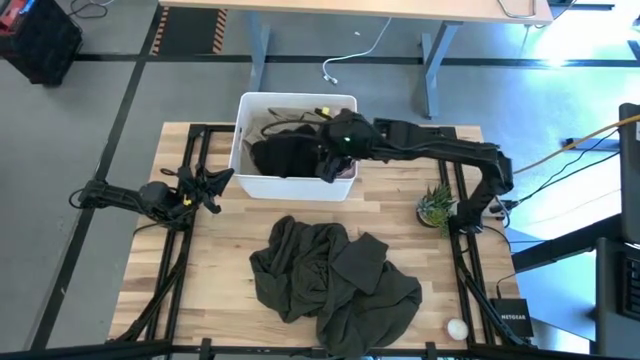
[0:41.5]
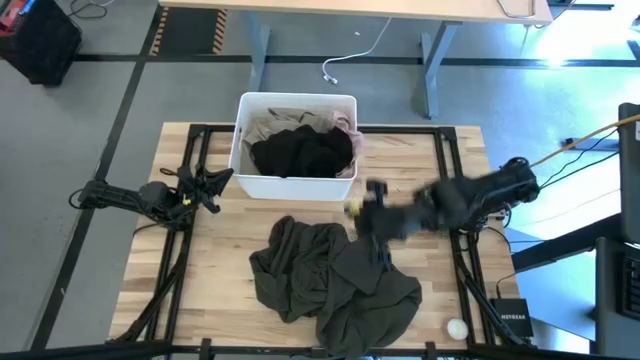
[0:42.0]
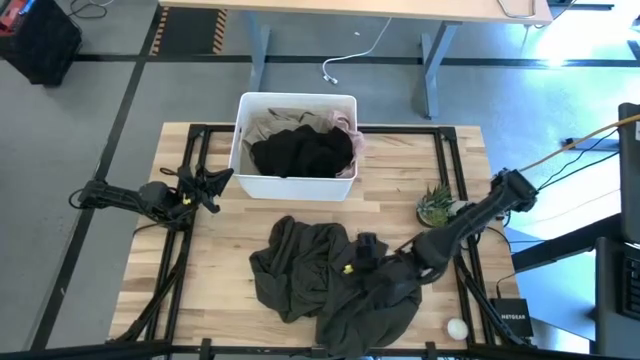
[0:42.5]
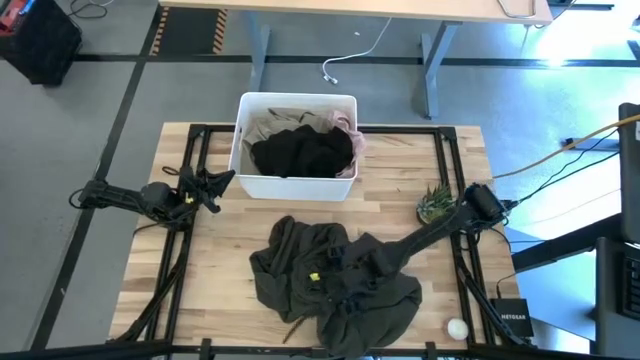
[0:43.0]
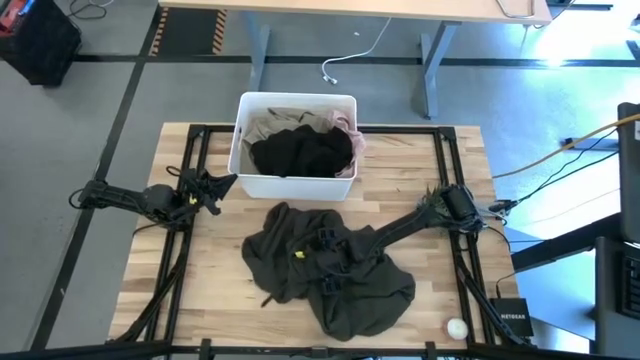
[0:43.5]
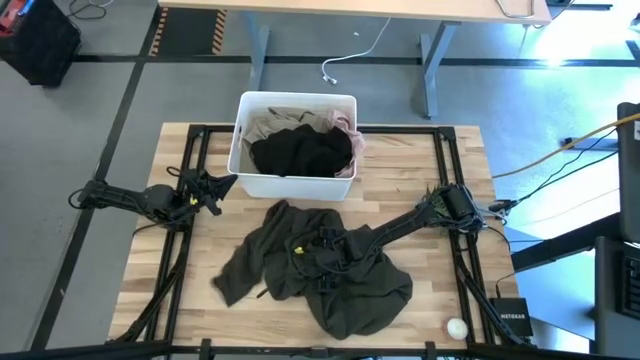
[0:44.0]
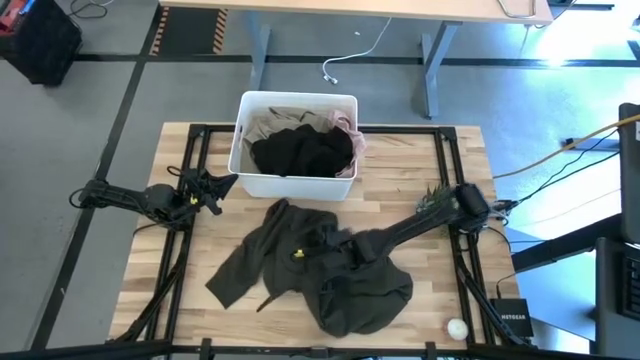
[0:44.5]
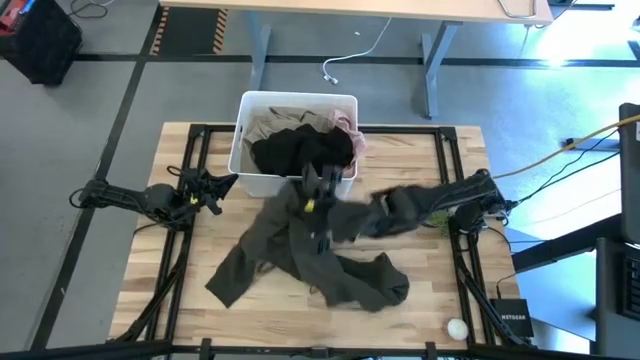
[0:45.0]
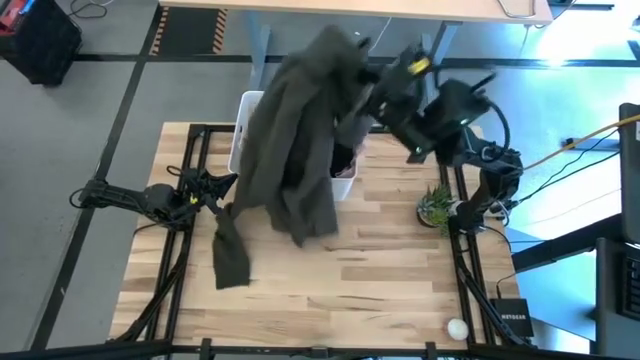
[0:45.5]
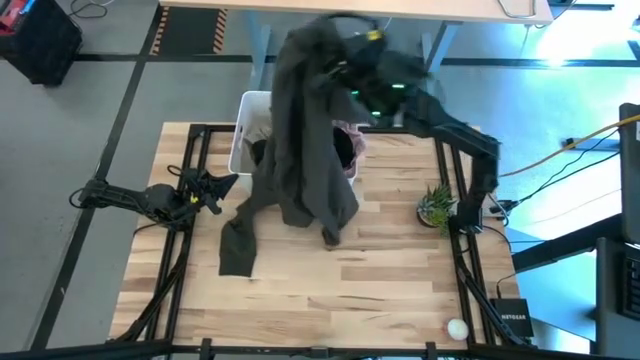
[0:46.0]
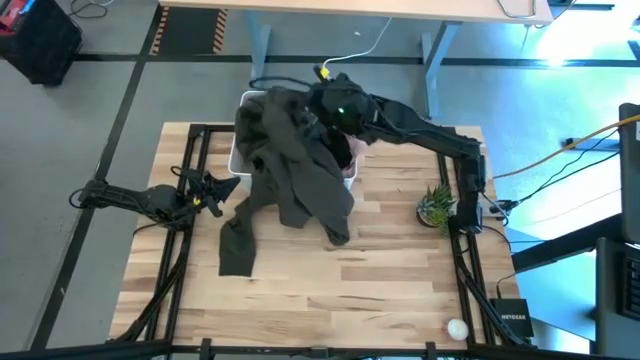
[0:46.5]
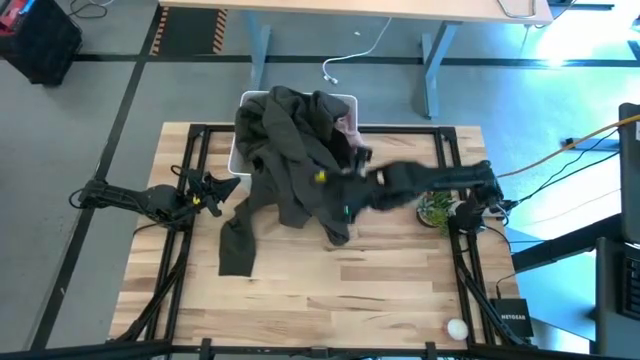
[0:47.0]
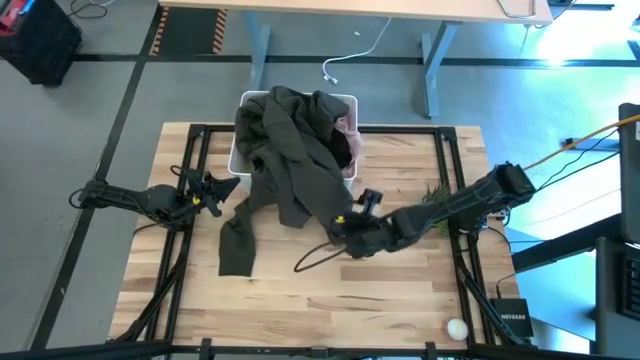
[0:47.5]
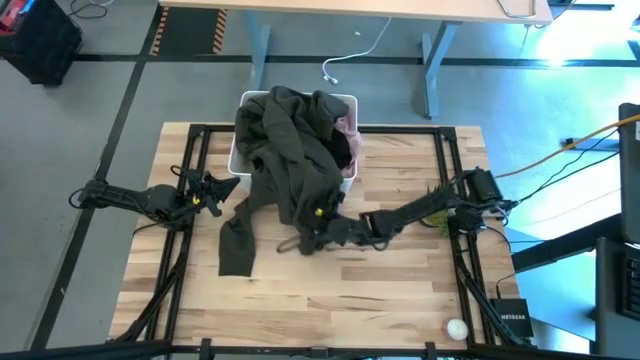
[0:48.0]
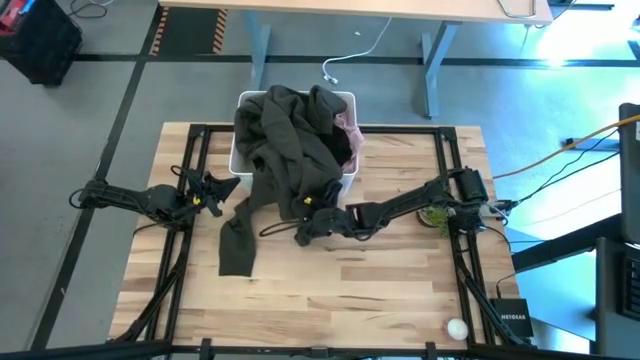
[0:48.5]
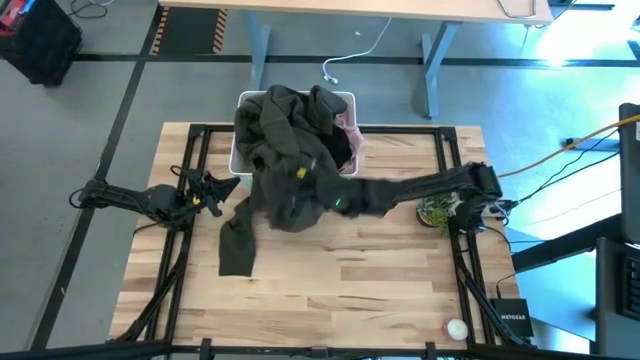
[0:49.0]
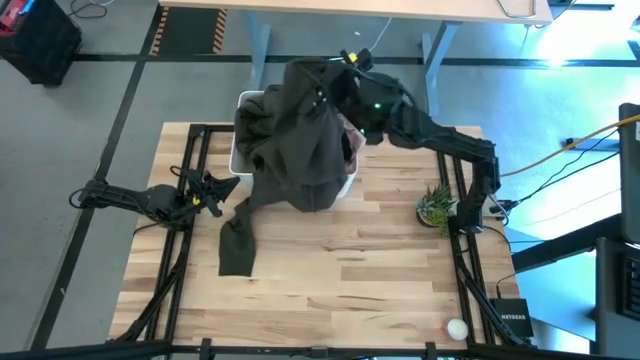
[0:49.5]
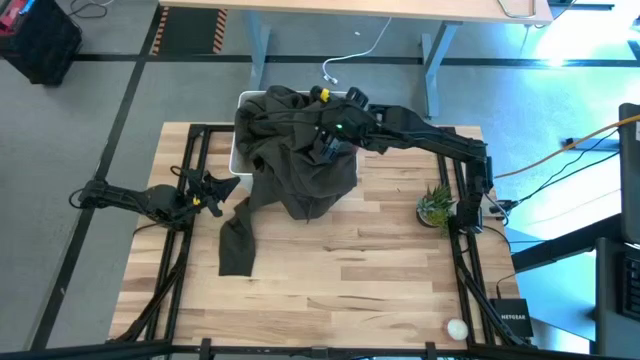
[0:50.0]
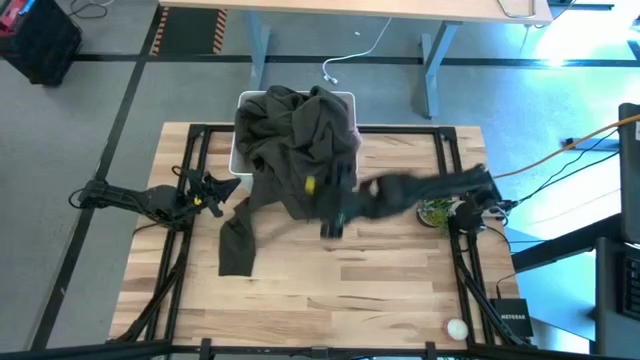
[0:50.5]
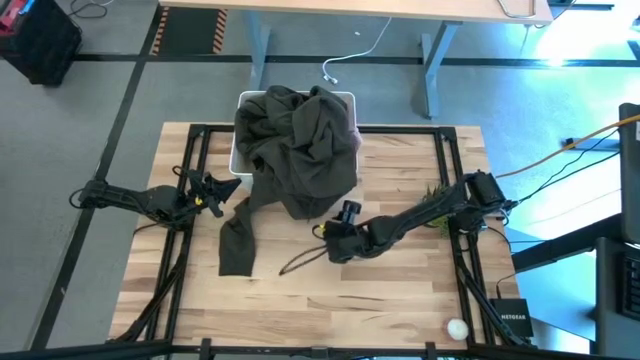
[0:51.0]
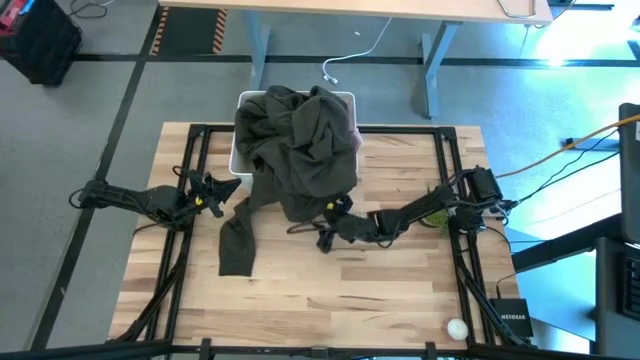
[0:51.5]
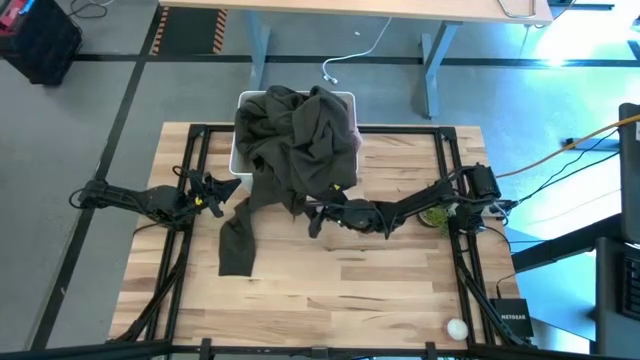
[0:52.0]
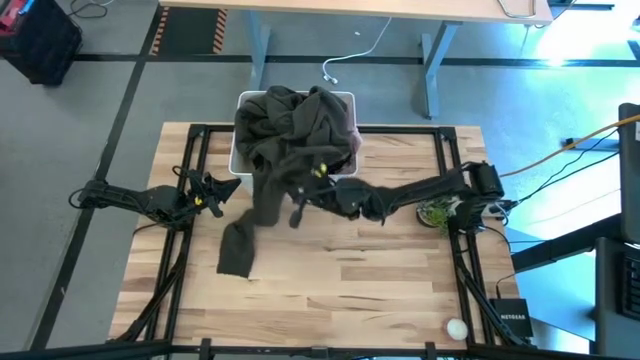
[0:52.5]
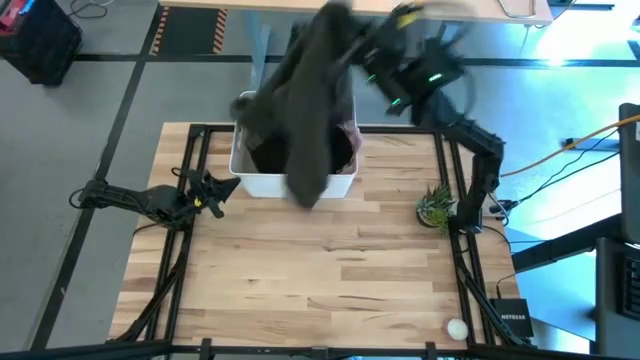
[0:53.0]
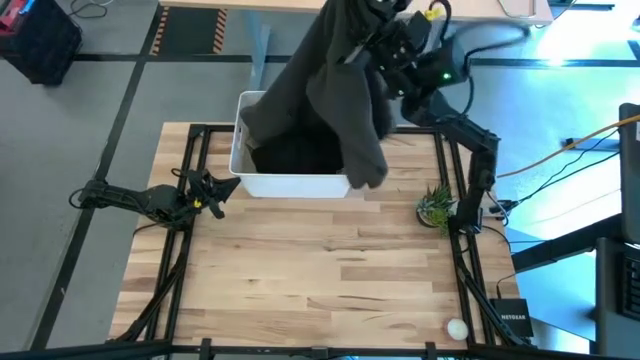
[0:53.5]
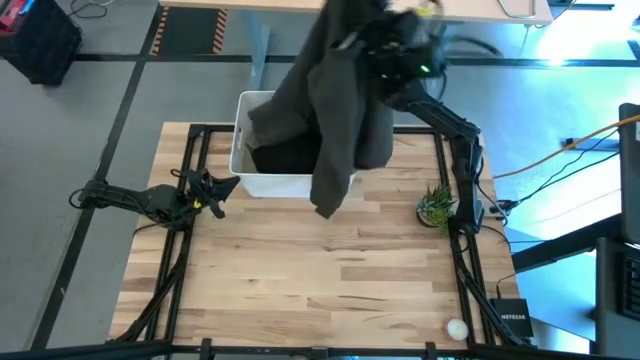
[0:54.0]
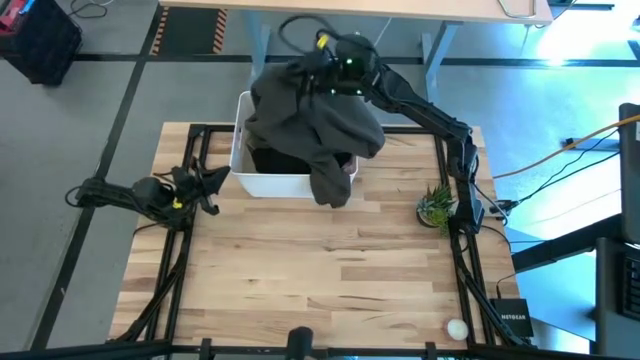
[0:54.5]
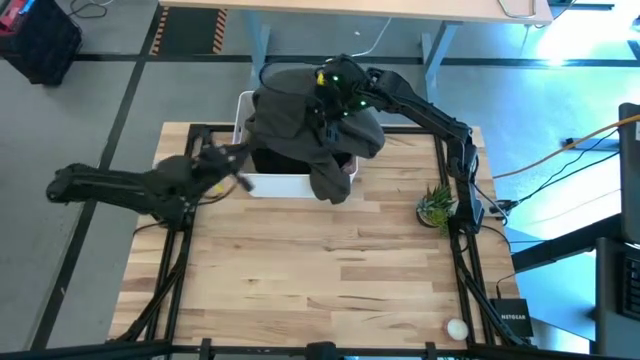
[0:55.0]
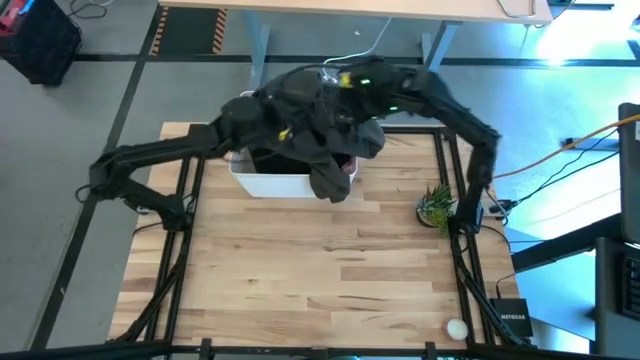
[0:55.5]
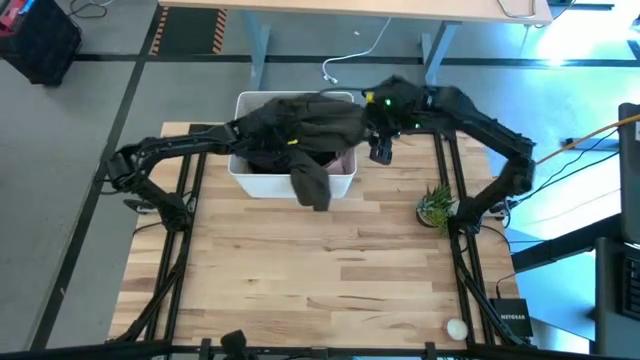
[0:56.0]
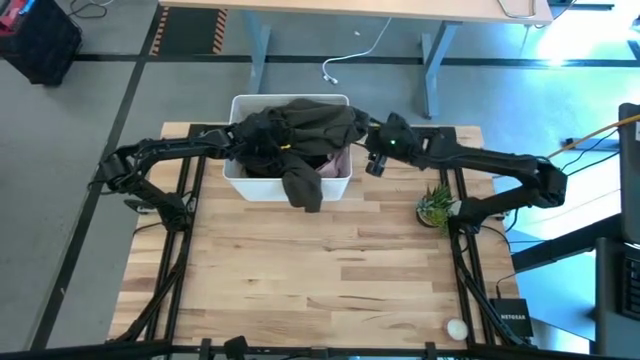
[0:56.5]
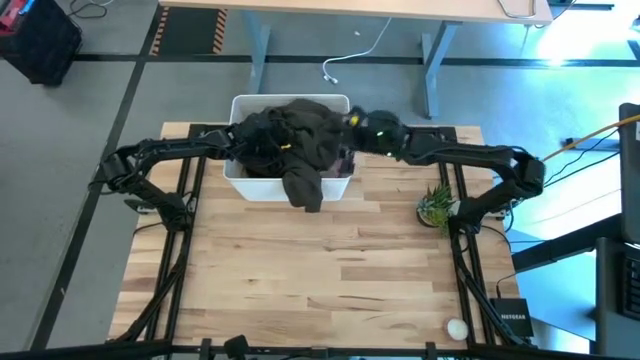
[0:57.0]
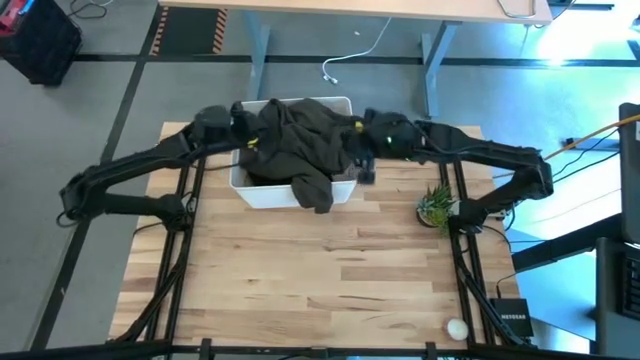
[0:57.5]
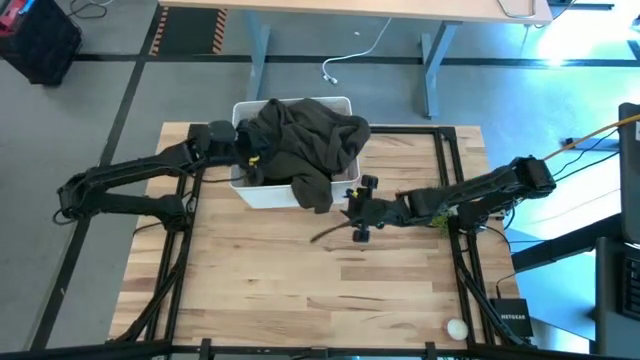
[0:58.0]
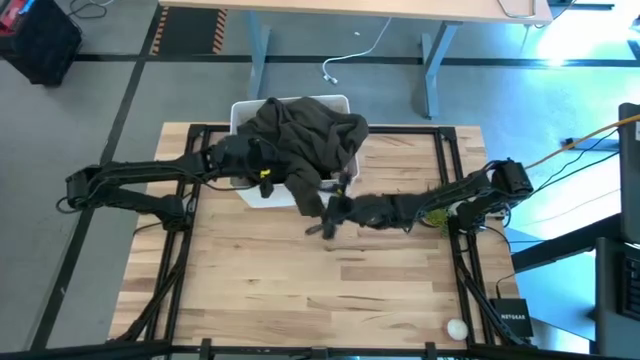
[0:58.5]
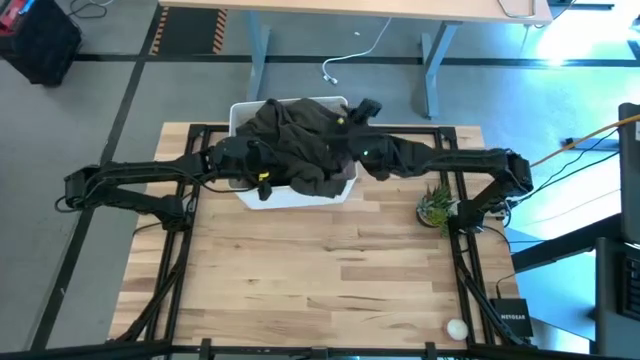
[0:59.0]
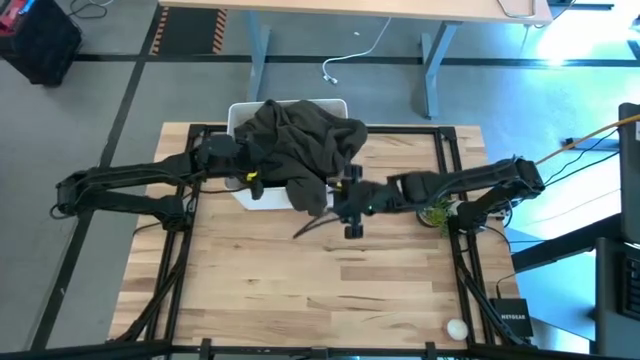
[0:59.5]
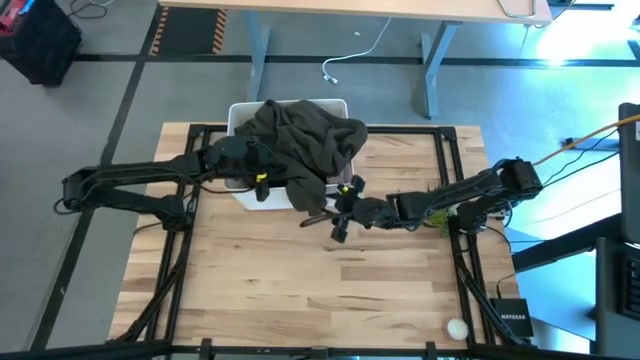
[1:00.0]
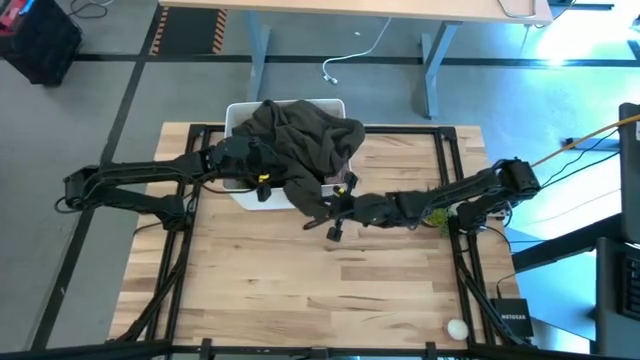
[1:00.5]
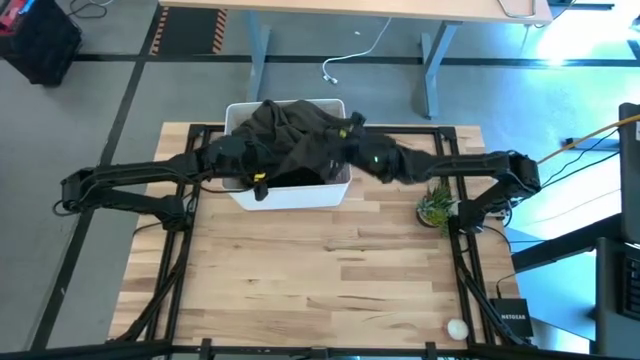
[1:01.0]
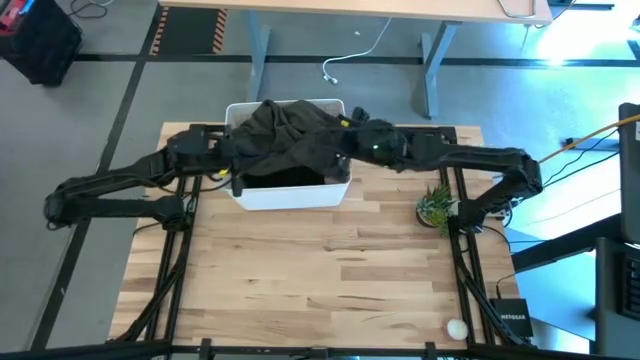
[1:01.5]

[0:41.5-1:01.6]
Task: Sort clothes
Put the black jacket into the white bin
